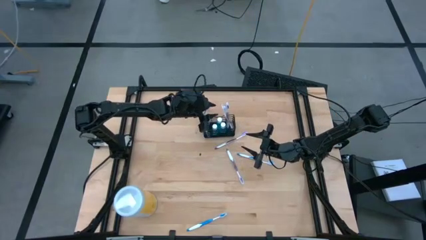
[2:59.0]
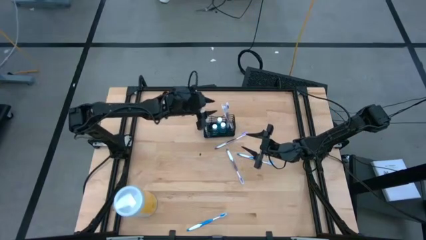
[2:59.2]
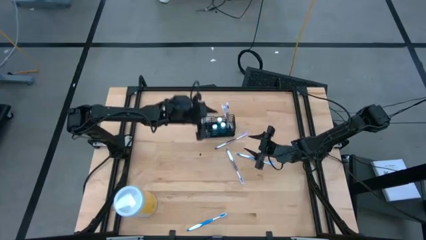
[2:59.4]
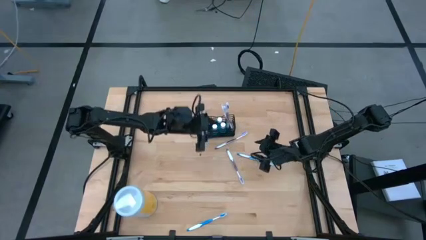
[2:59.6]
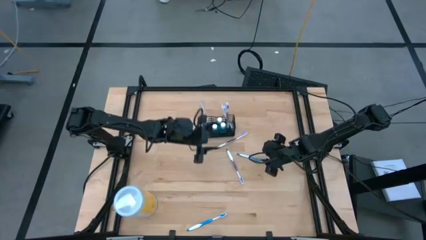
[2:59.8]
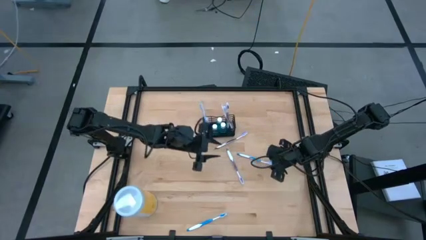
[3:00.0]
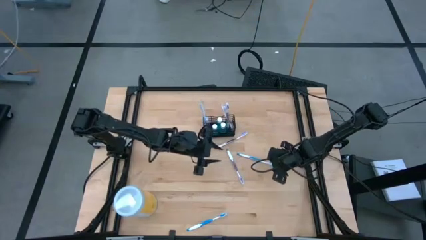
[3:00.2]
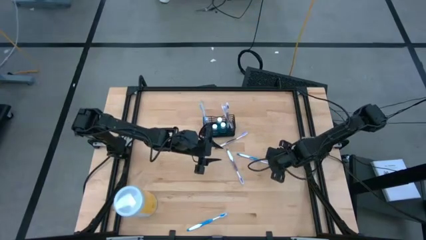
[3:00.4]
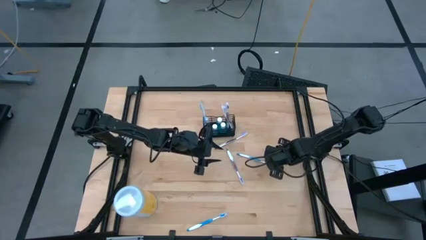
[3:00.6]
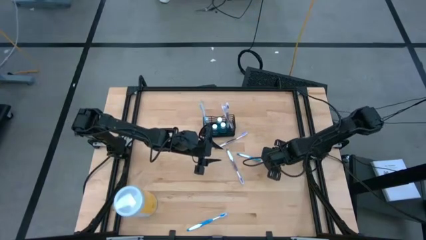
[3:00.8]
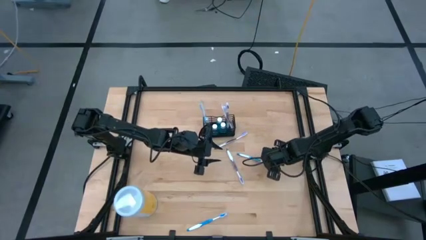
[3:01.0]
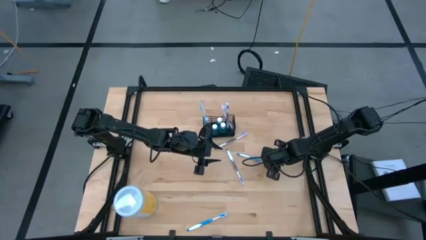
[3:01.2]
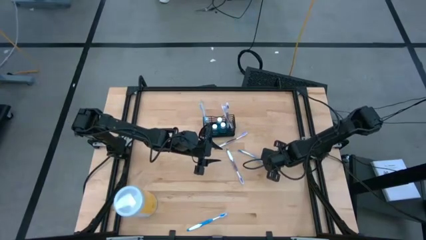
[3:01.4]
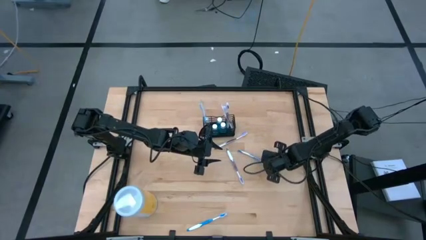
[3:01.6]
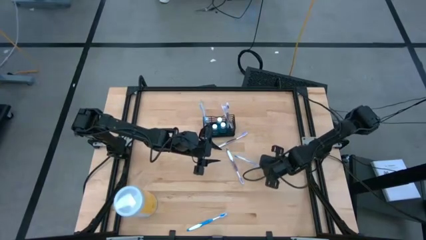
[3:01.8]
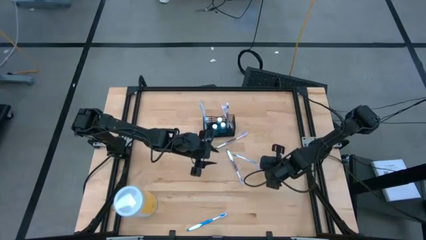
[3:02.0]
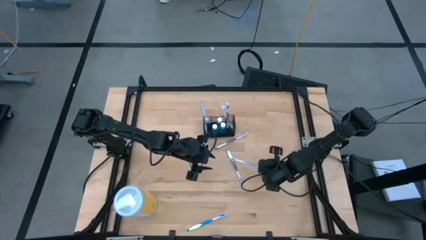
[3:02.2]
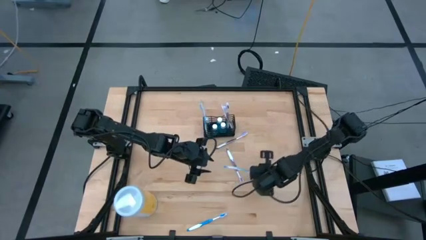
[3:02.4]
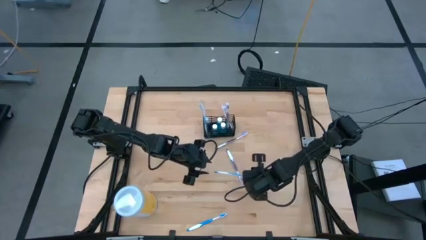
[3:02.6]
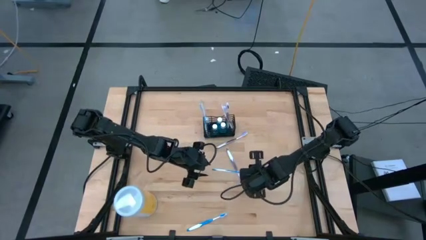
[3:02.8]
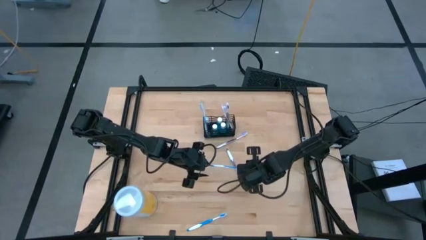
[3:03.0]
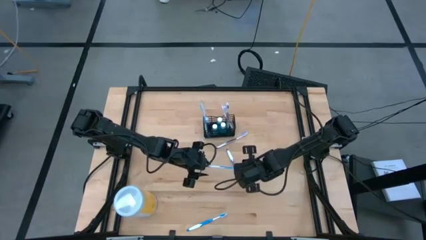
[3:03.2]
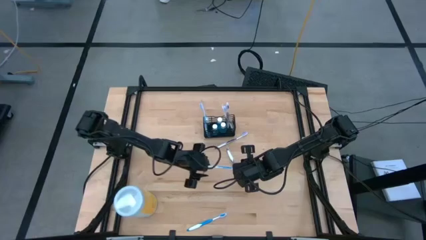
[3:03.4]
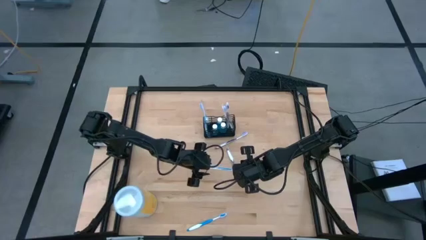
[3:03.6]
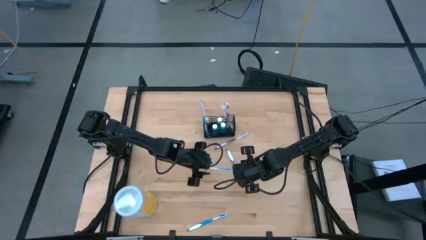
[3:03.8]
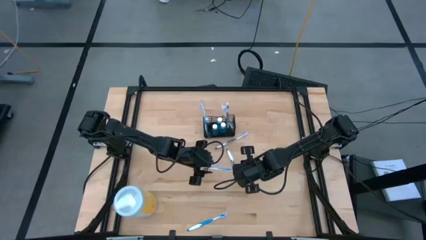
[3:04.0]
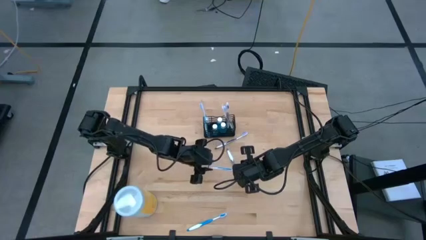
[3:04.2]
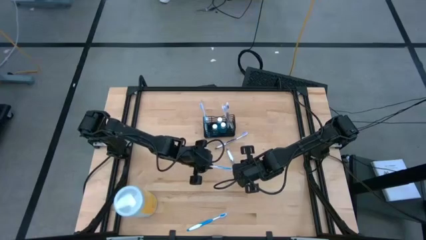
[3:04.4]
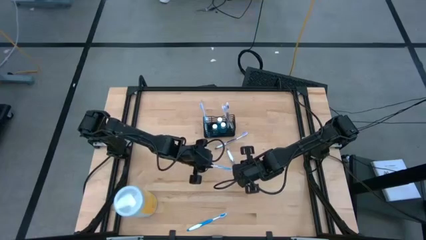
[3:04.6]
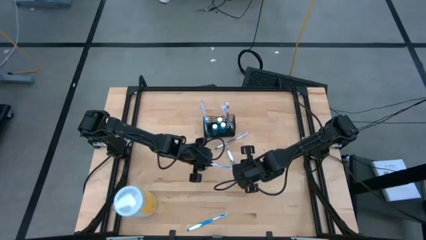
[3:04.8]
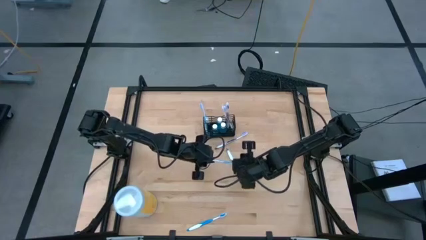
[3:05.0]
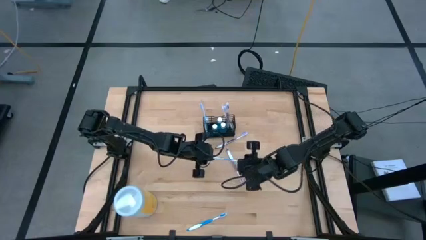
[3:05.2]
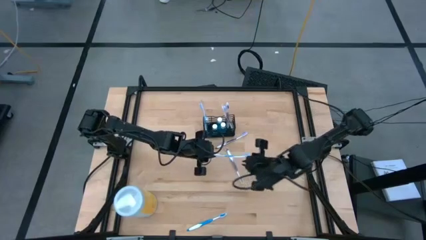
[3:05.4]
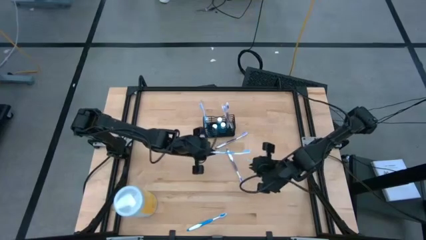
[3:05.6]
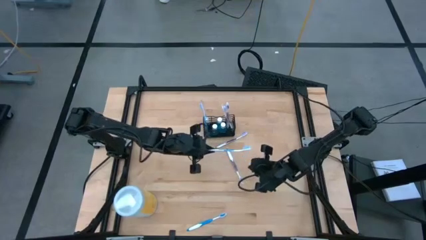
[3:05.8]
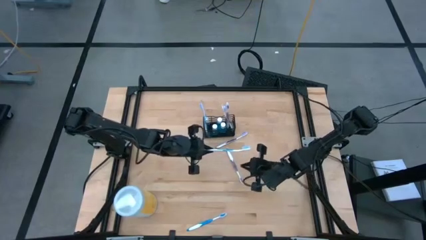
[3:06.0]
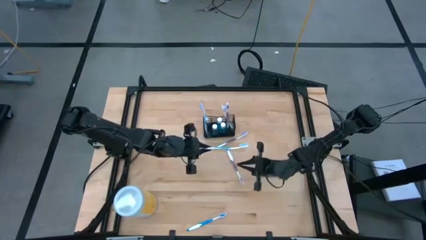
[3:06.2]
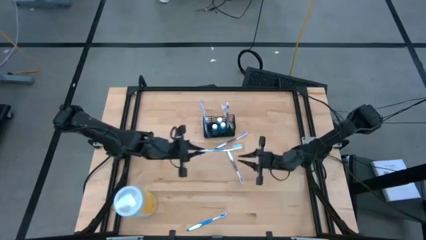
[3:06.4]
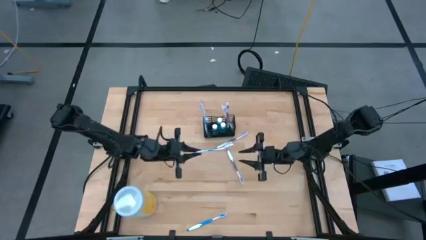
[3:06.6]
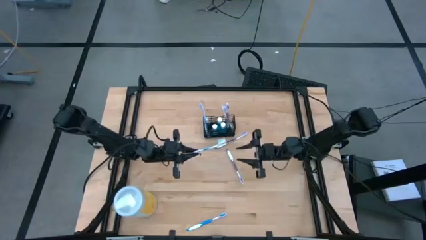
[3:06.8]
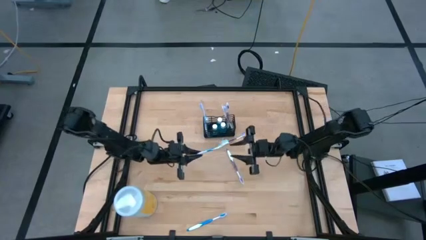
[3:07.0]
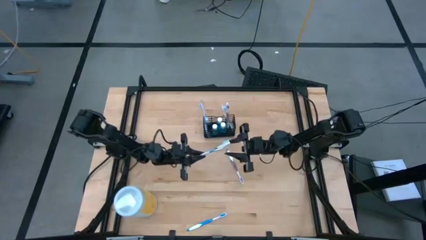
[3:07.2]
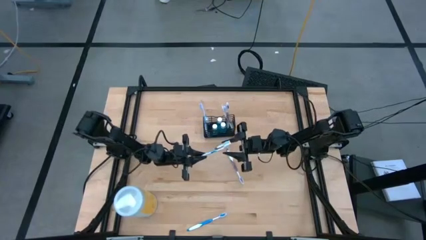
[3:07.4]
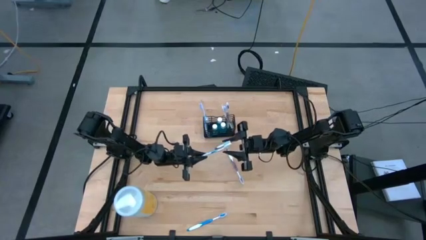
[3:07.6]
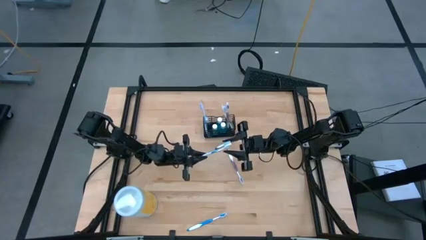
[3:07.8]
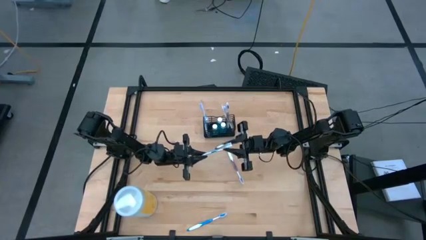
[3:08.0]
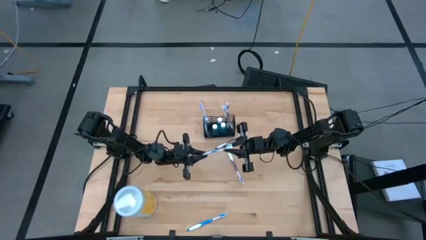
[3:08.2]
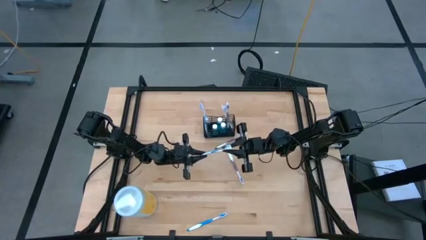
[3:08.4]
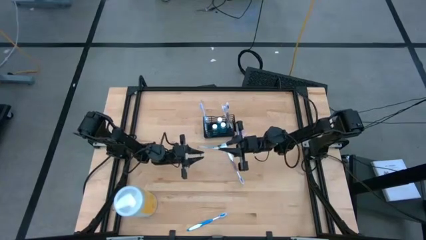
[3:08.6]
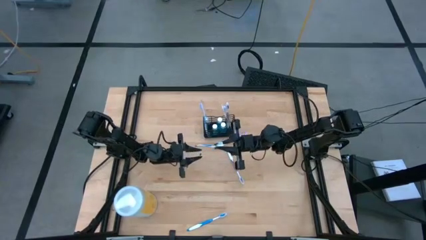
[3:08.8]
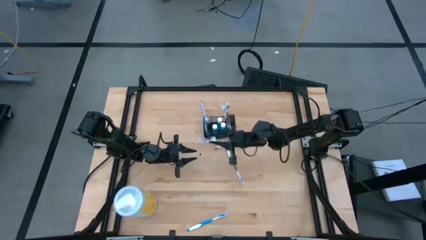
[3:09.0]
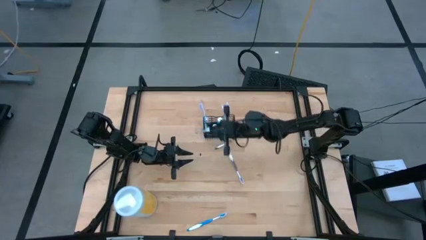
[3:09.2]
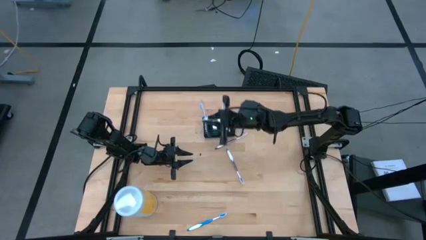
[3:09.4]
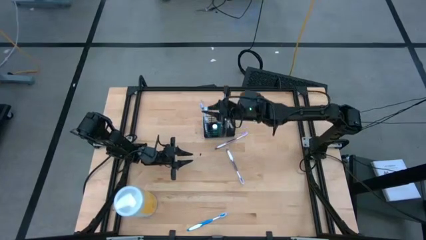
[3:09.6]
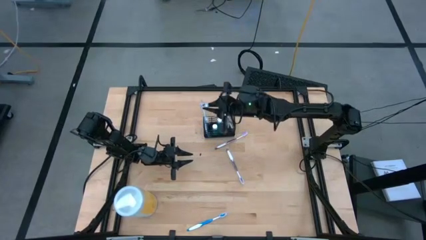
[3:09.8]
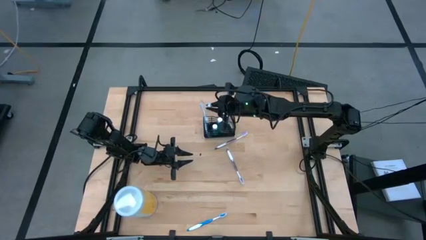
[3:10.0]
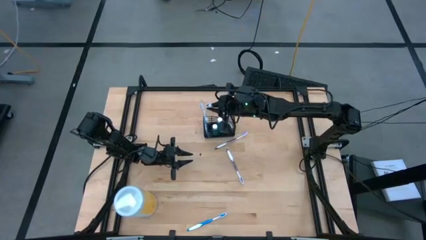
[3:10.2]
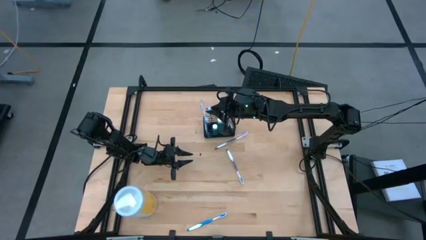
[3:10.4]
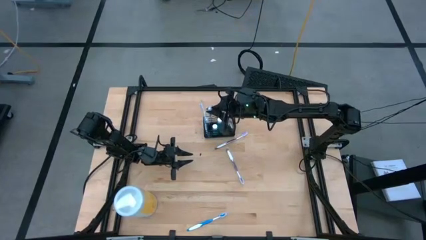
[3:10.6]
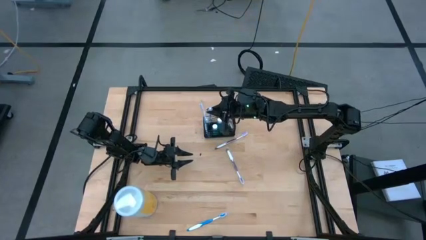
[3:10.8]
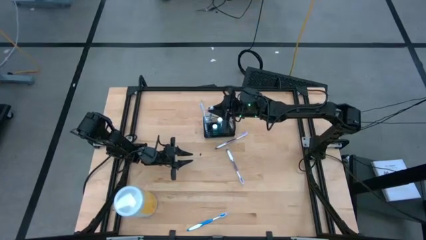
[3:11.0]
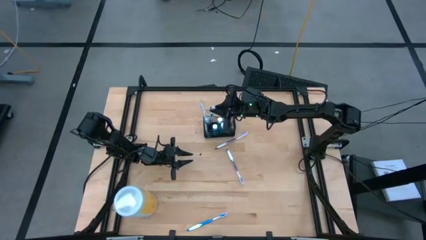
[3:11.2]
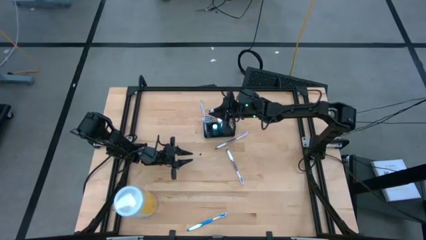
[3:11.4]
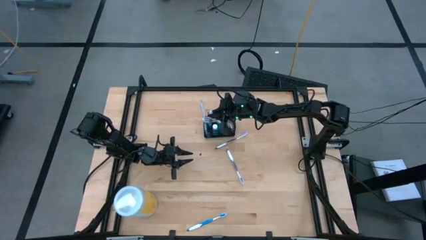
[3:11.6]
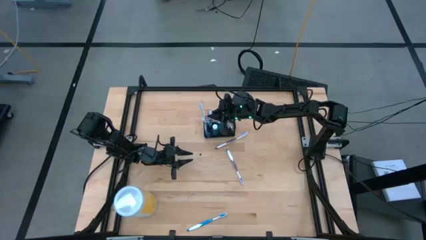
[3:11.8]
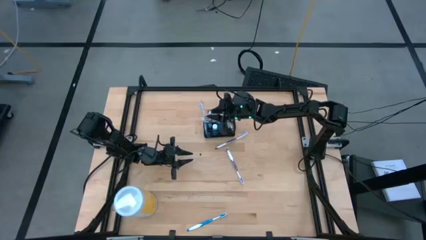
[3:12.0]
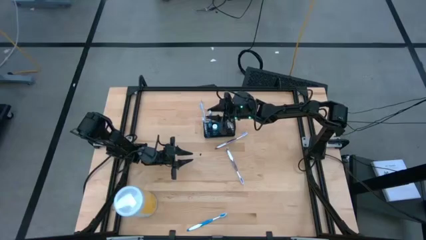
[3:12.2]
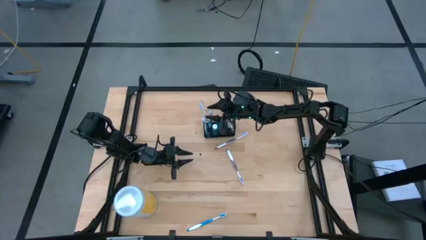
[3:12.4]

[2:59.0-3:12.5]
Task: Pick & Place toothbrushing station
Put the blue toothbrush into the black organizer
